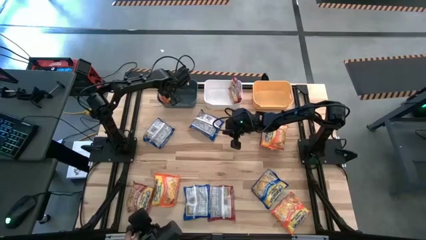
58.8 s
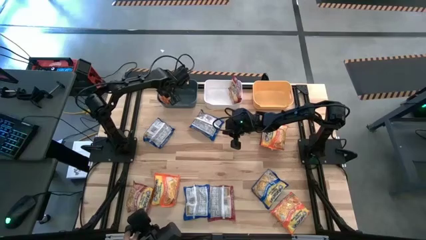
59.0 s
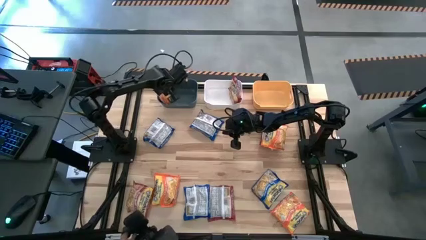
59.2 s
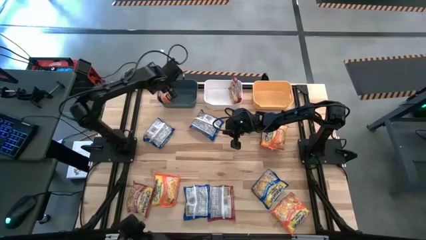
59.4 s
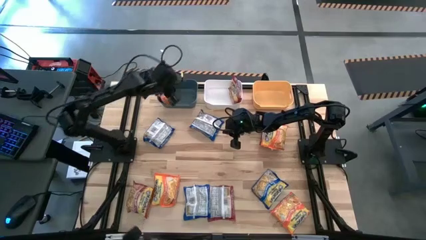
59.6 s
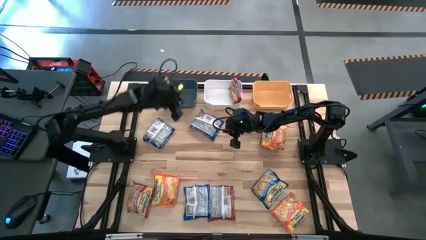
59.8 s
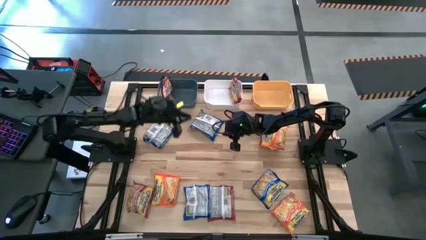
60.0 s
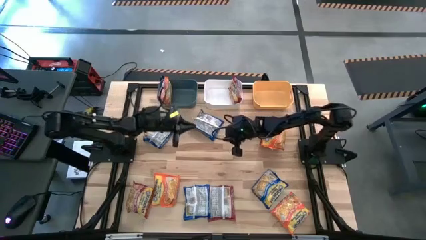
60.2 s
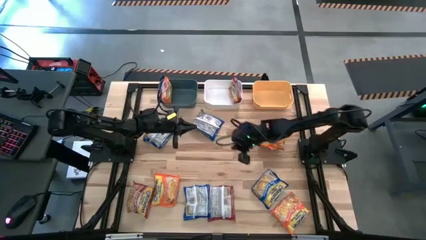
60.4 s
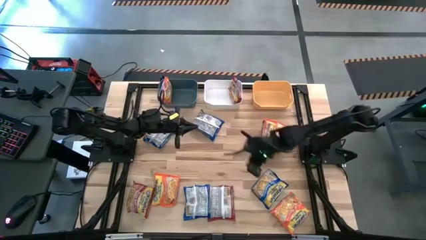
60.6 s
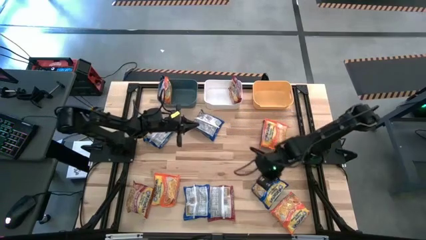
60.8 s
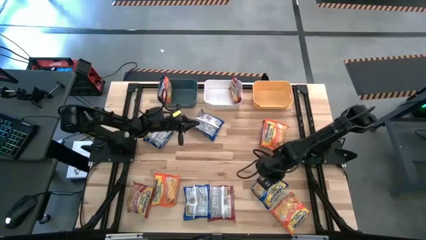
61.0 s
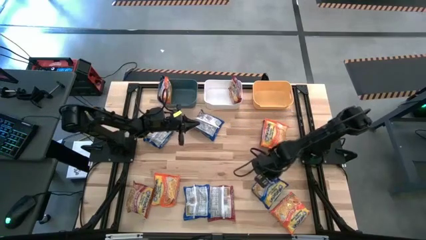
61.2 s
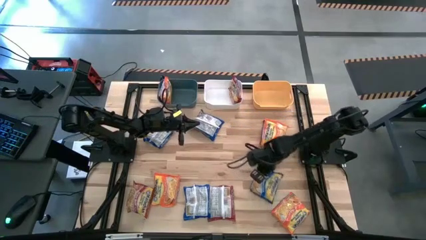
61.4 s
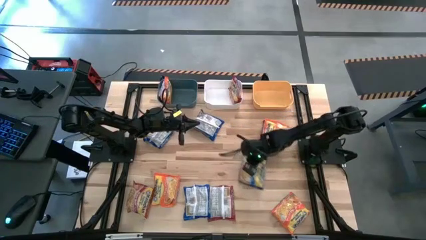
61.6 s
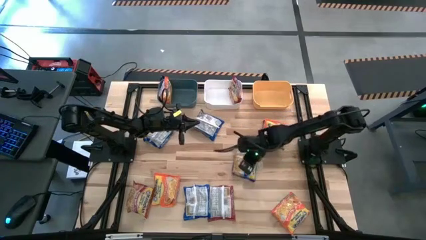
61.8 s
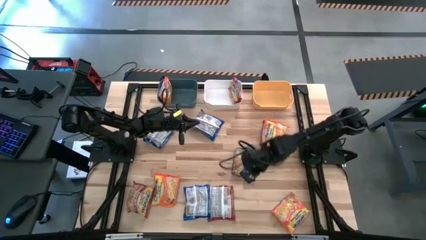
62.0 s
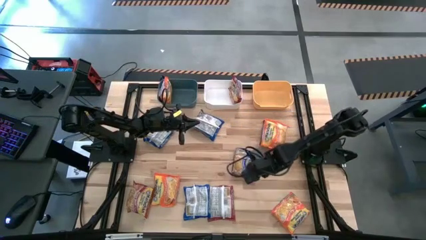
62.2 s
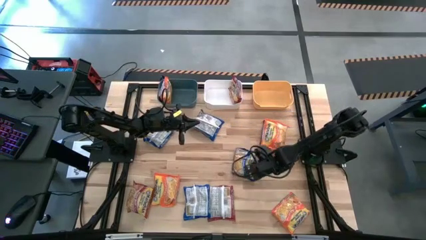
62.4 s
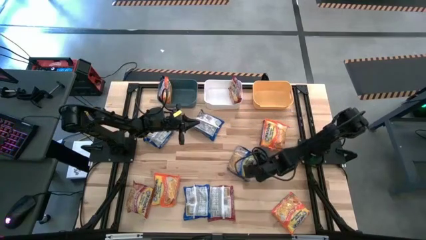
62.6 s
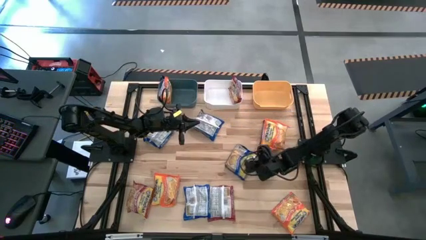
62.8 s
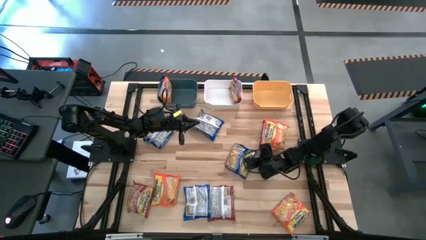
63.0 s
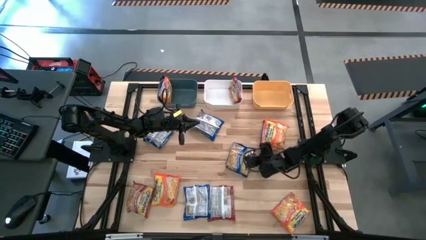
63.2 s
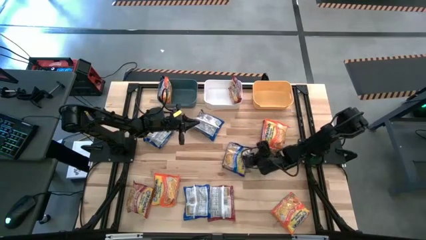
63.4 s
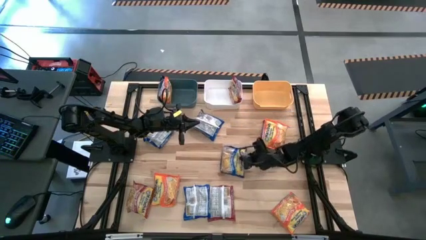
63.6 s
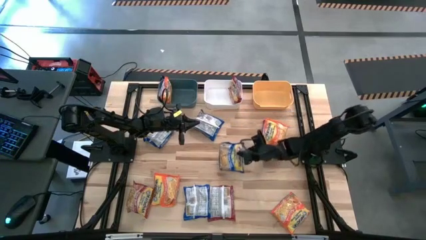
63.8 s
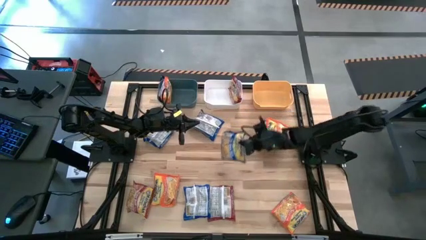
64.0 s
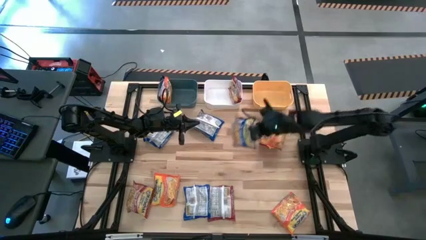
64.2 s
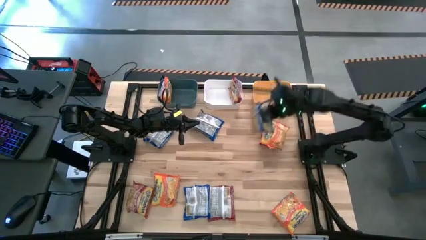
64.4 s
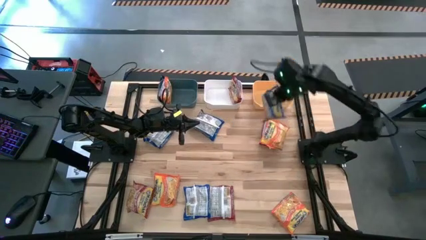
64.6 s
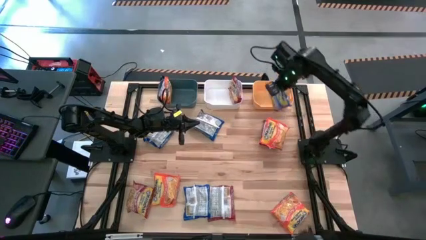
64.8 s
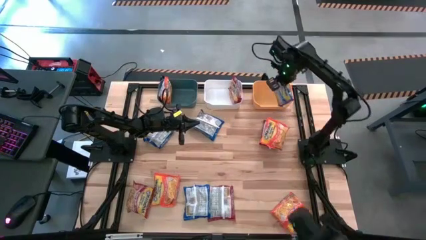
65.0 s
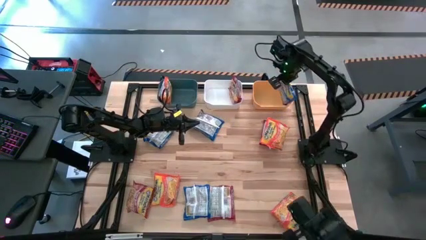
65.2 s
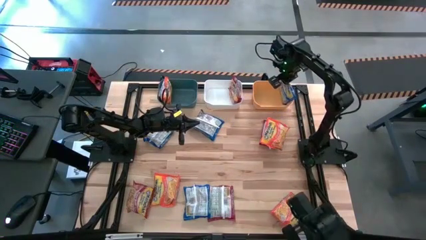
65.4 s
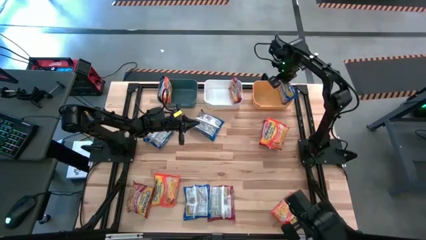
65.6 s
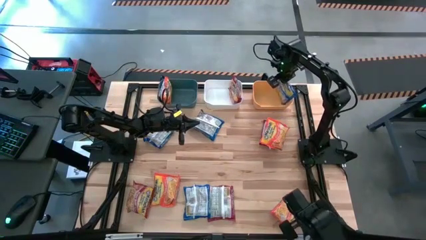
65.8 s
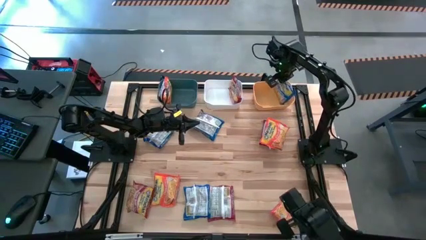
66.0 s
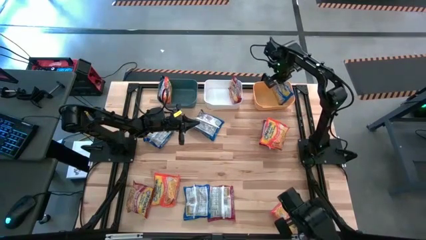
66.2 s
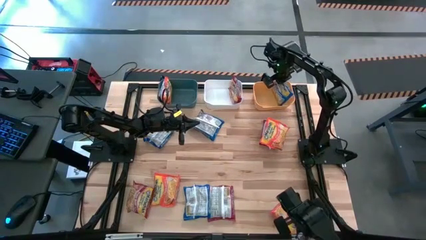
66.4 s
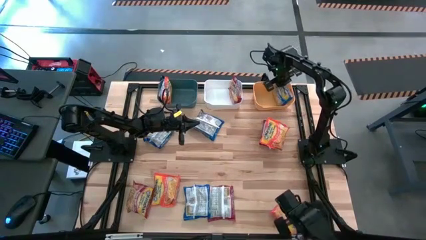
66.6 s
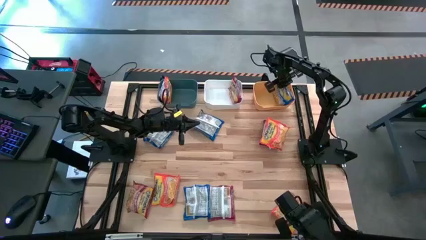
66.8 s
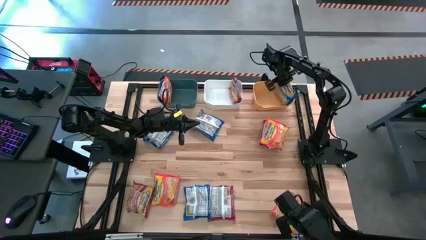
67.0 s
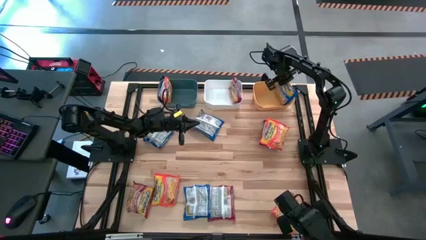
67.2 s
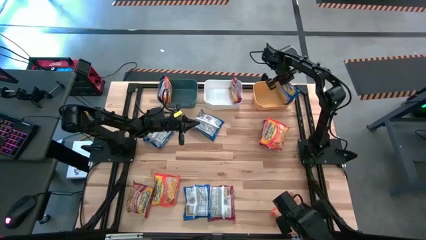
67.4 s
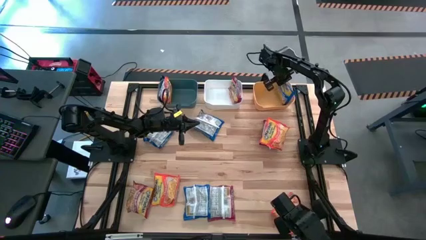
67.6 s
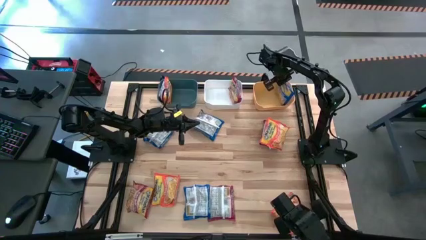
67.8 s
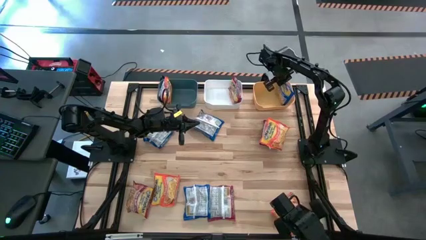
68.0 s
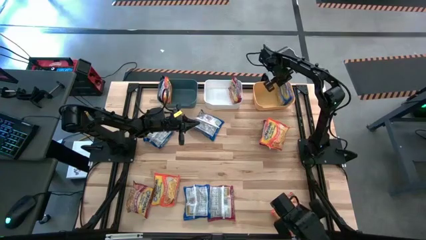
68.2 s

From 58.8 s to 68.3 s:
Task: Sort Maruchan noodles
Put the bottom right blue noodle pack into the yellow bin

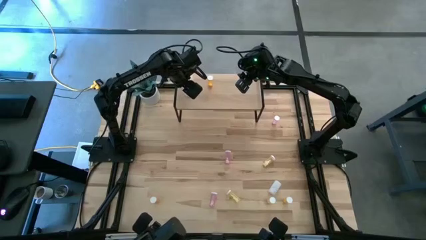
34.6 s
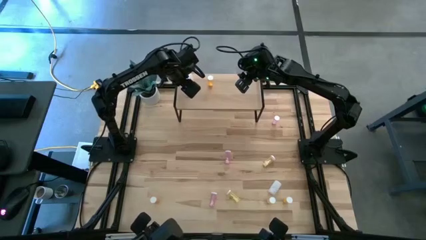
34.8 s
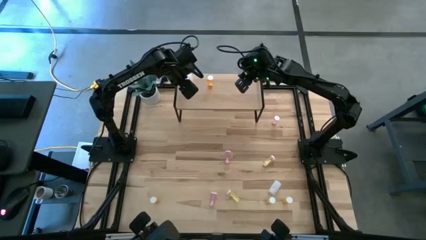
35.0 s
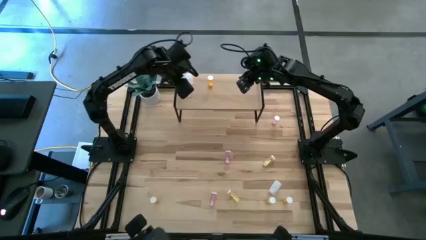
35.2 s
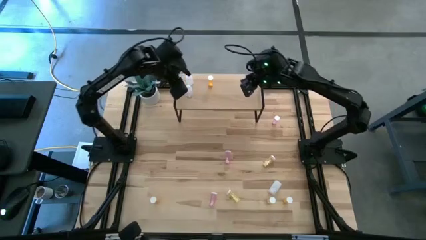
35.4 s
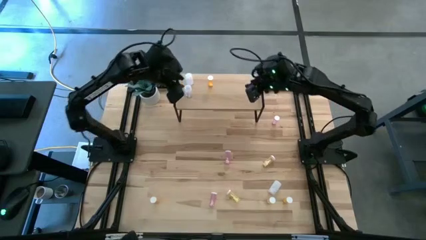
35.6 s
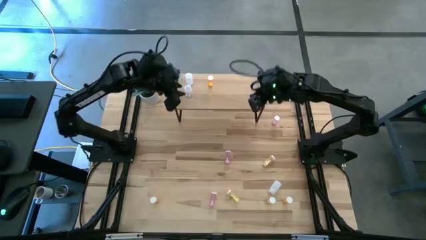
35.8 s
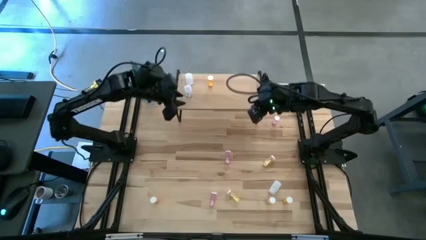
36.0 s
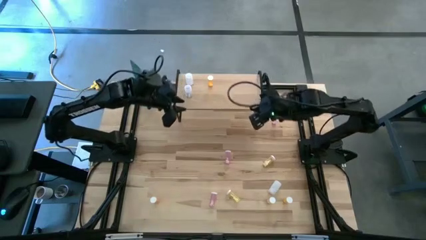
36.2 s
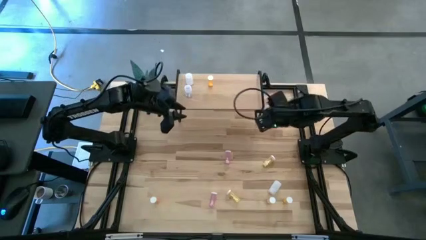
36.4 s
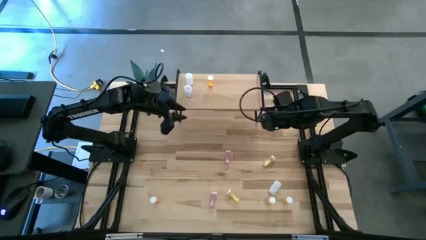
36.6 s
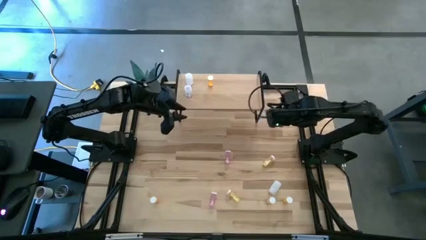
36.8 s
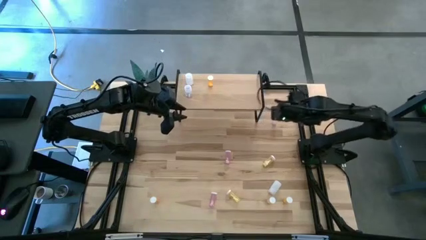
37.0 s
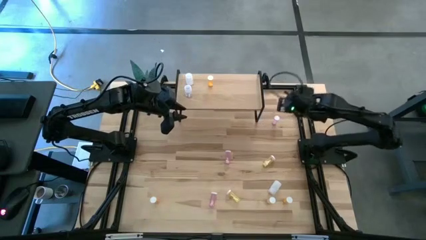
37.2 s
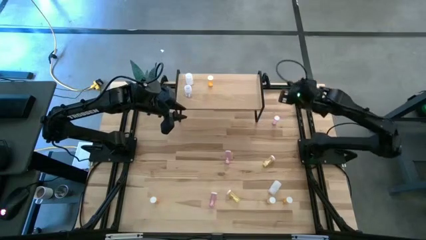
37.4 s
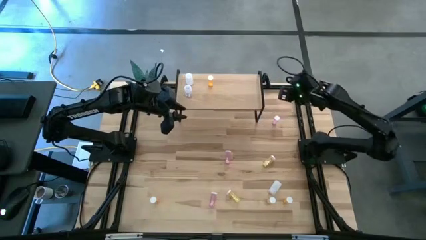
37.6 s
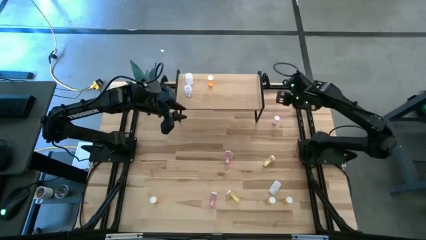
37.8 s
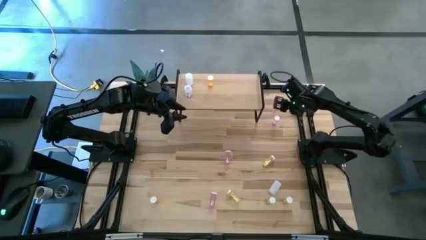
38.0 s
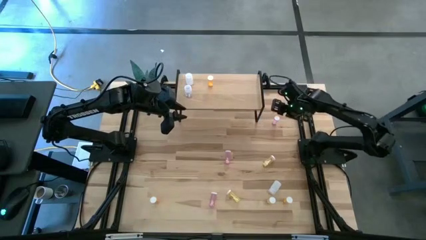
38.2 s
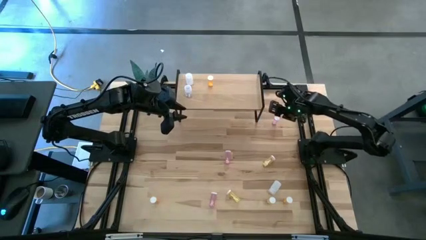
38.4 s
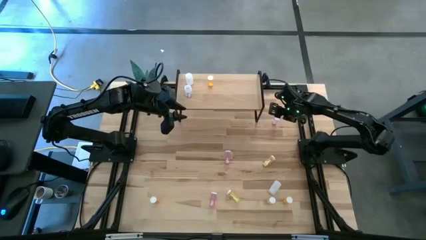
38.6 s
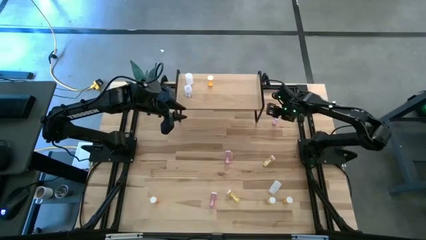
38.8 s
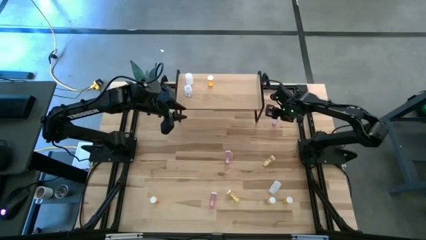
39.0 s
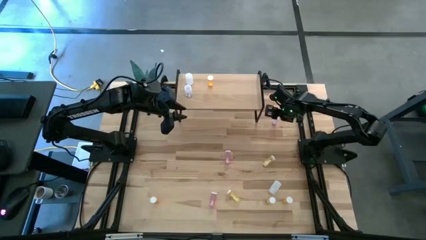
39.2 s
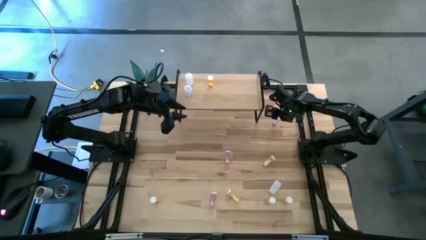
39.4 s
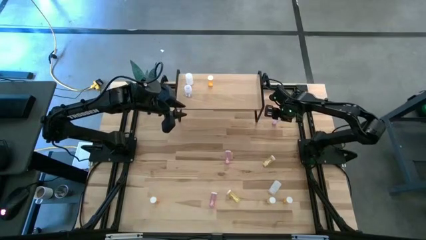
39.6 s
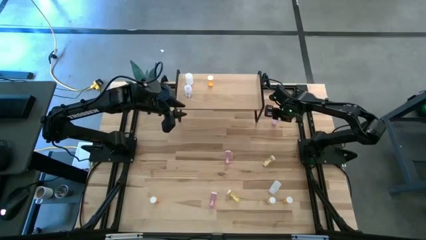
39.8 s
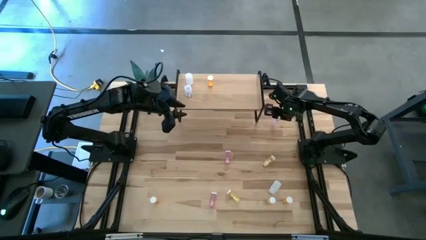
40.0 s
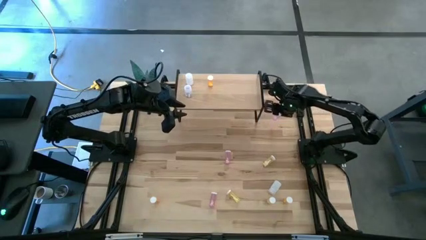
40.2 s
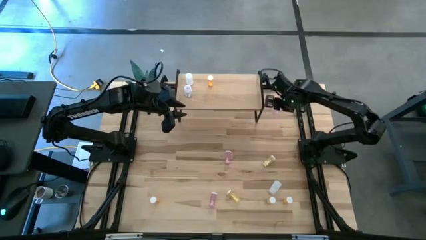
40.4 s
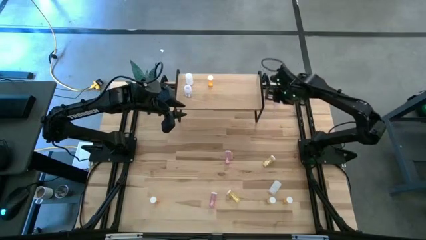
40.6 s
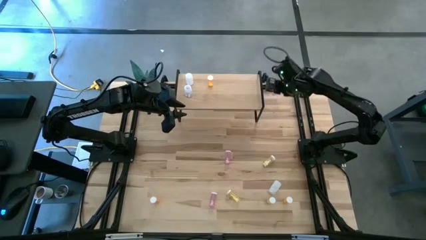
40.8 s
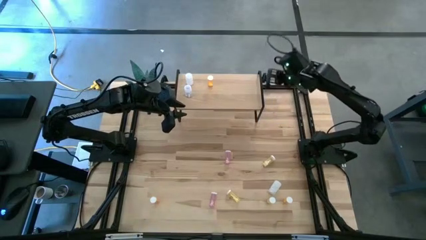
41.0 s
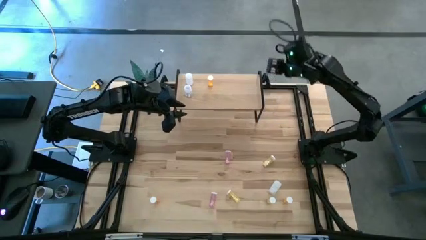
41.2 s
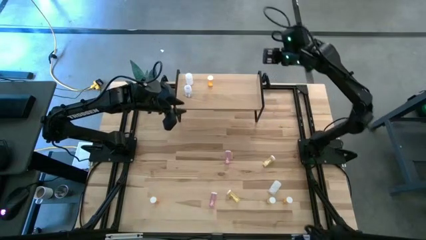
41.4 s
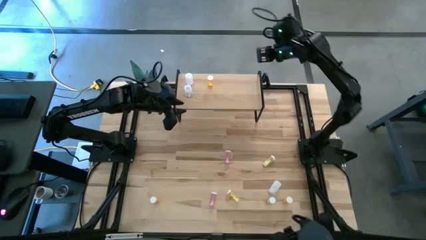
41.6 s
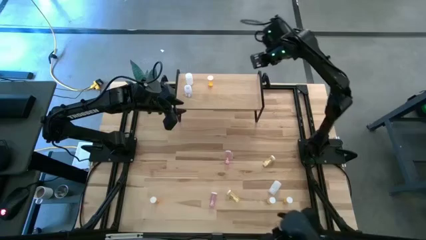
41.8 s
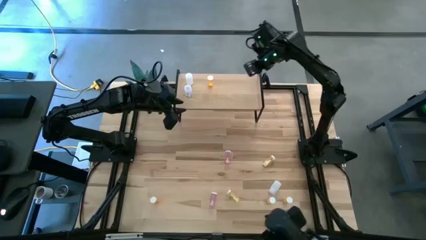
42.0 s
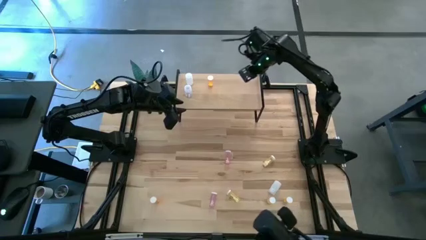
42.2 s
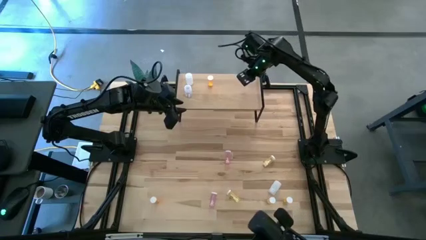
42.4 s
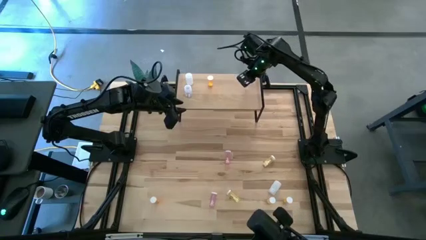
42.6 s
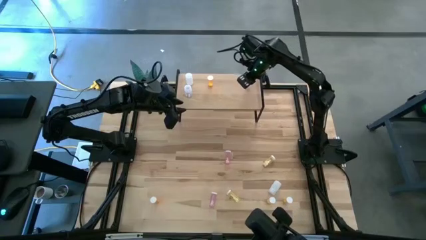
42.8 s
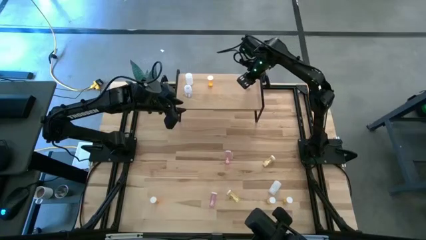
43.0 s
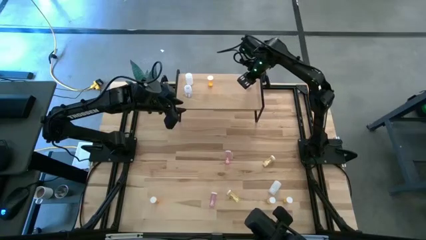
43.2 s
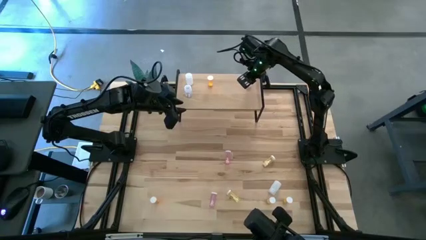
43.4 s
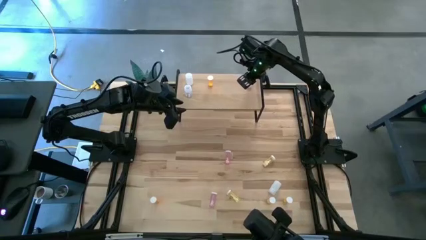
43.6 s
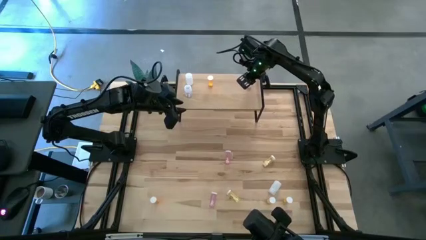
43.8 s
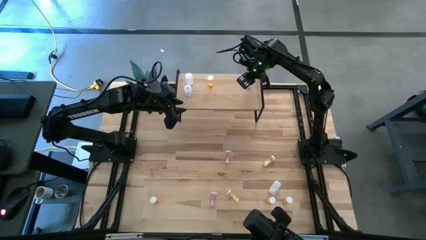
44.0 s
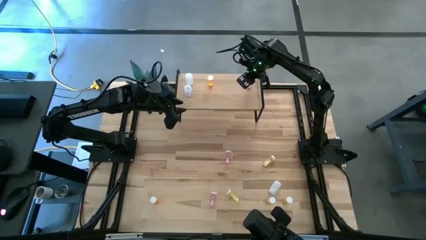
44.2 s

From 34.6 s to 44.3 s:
Task: Pick and place medicine bottles onto shelf by color
Put the top right pink pill bottle on the shelf
